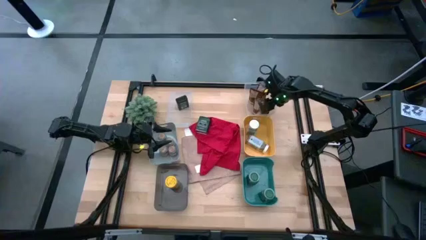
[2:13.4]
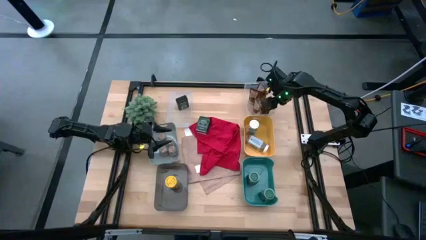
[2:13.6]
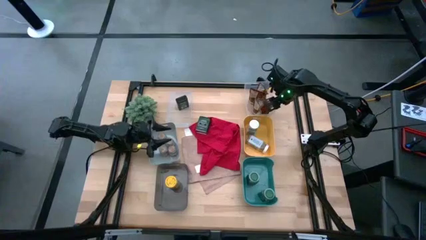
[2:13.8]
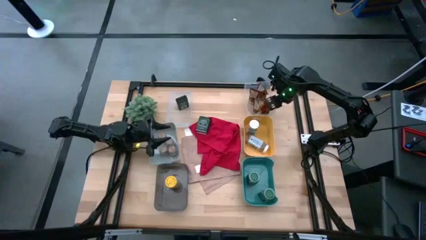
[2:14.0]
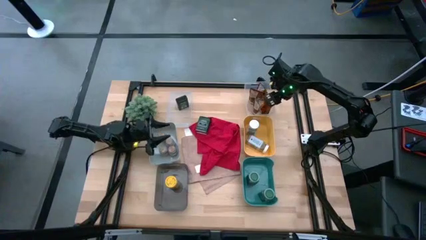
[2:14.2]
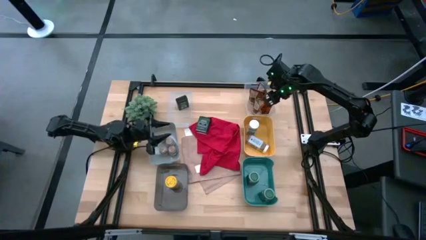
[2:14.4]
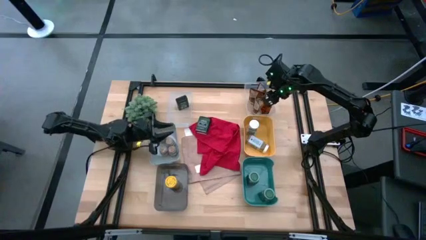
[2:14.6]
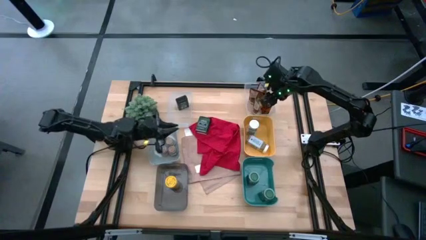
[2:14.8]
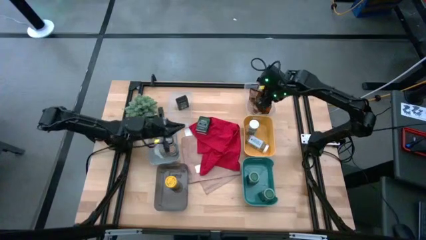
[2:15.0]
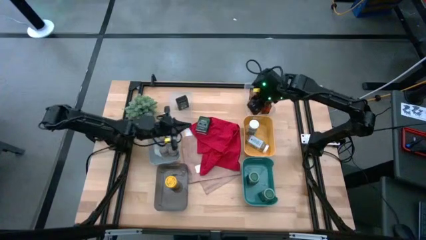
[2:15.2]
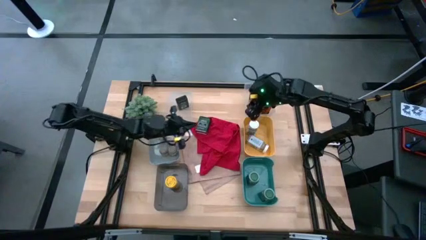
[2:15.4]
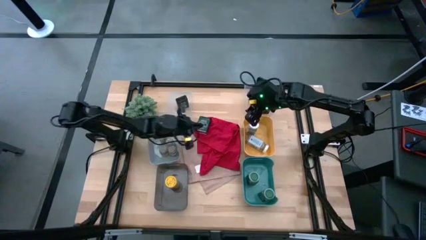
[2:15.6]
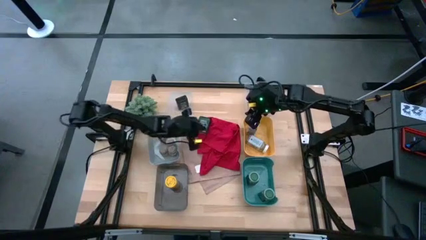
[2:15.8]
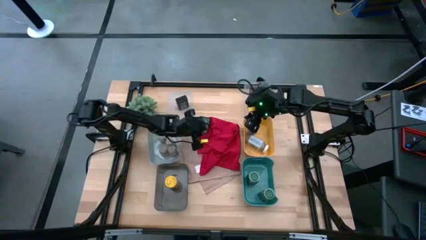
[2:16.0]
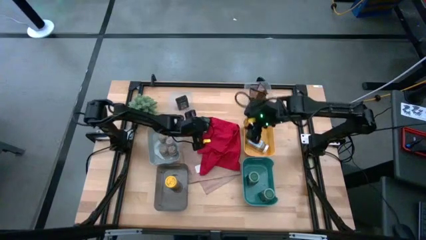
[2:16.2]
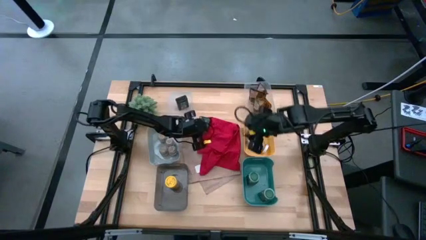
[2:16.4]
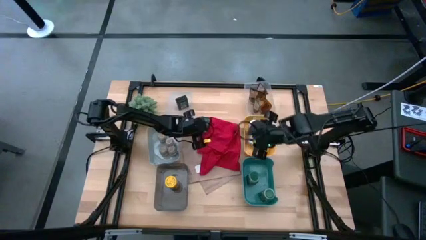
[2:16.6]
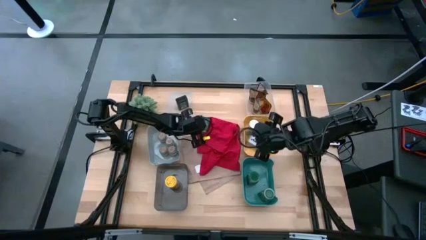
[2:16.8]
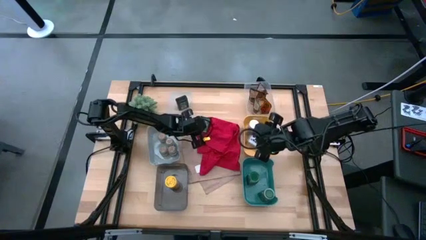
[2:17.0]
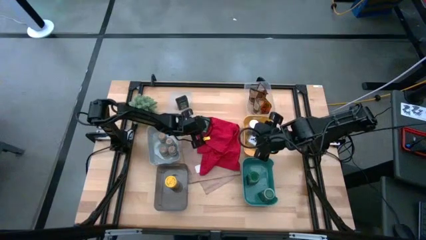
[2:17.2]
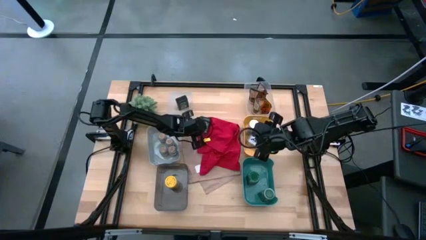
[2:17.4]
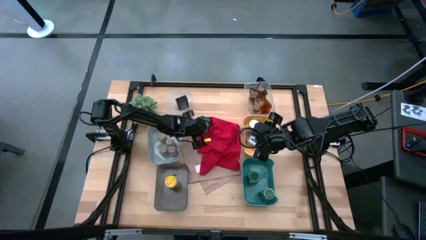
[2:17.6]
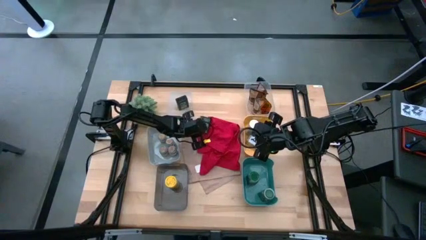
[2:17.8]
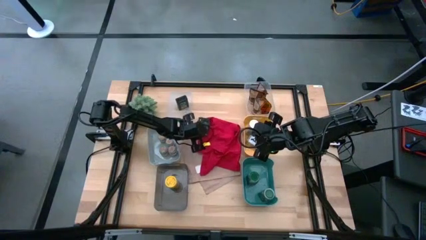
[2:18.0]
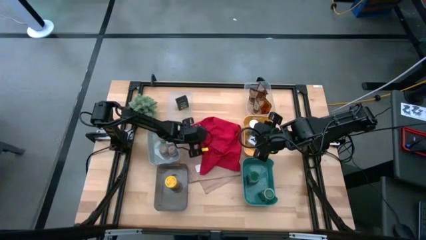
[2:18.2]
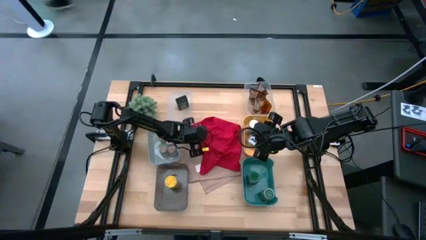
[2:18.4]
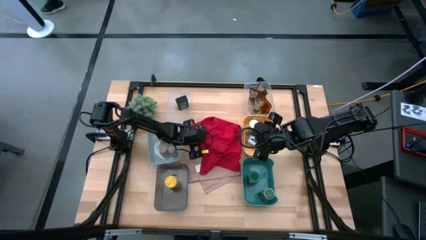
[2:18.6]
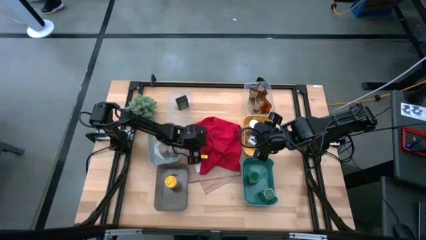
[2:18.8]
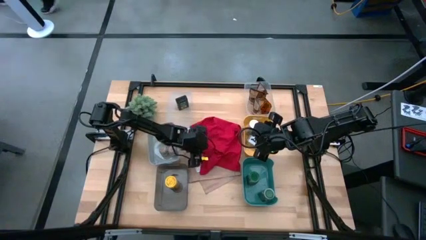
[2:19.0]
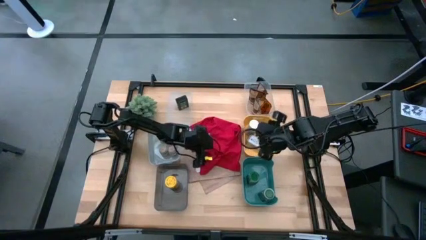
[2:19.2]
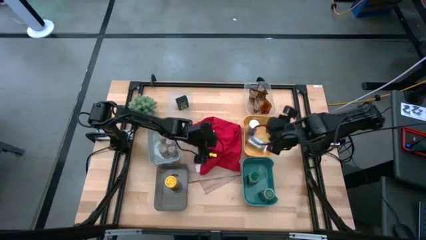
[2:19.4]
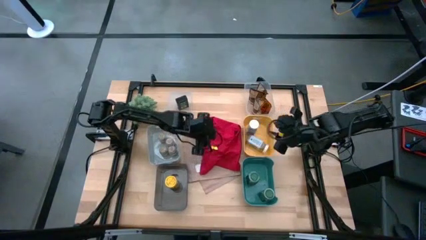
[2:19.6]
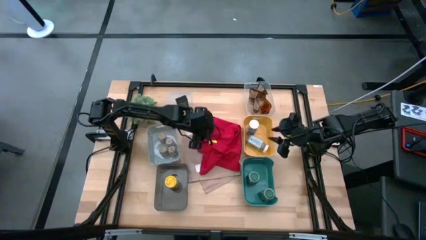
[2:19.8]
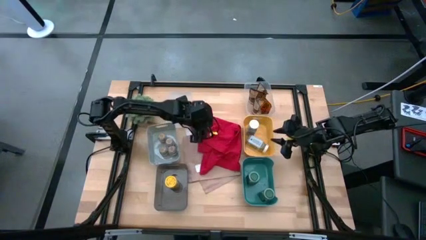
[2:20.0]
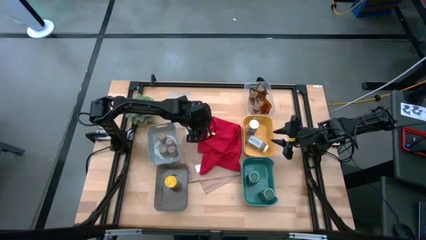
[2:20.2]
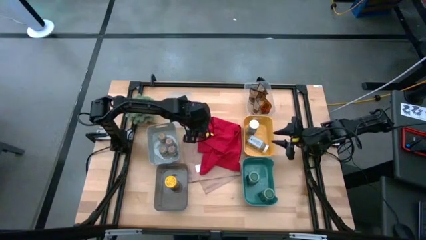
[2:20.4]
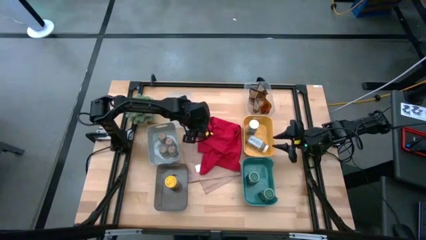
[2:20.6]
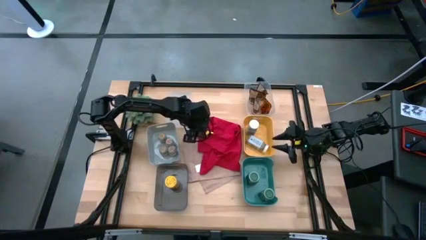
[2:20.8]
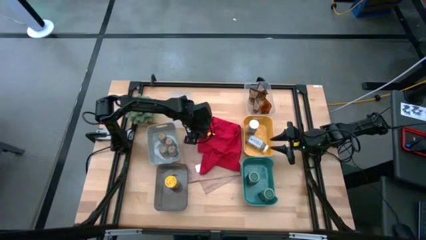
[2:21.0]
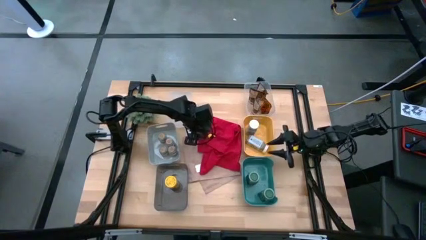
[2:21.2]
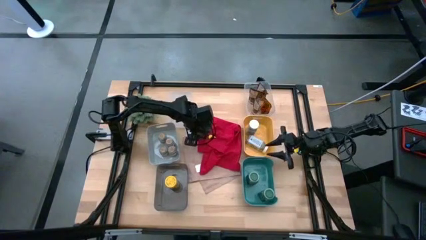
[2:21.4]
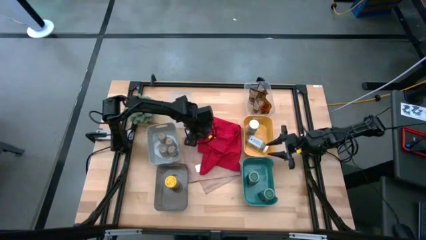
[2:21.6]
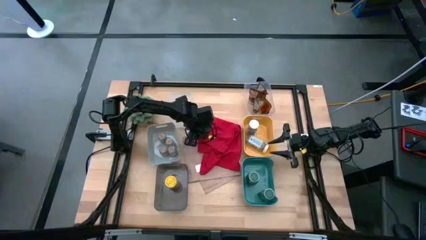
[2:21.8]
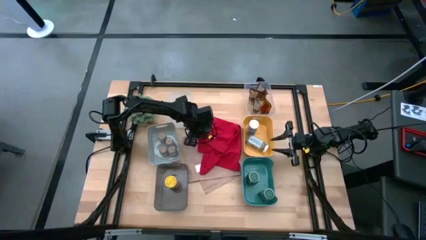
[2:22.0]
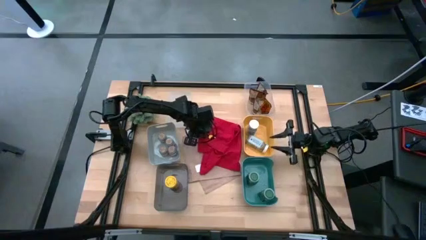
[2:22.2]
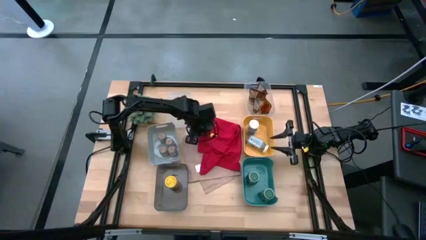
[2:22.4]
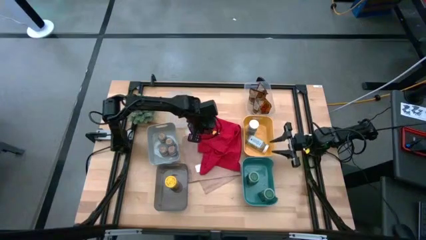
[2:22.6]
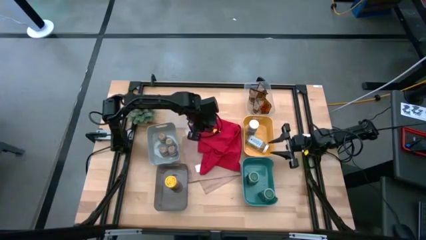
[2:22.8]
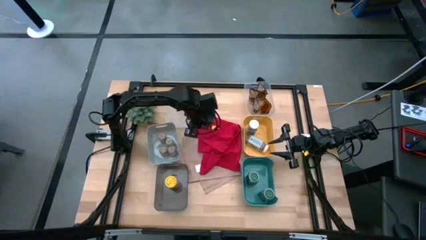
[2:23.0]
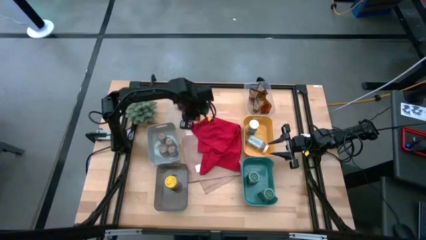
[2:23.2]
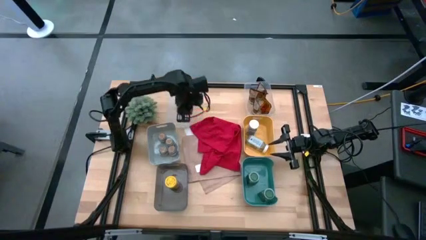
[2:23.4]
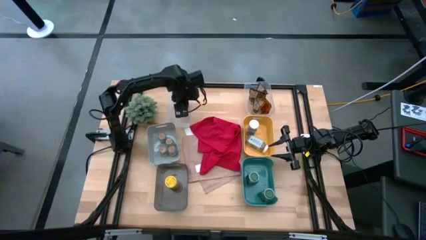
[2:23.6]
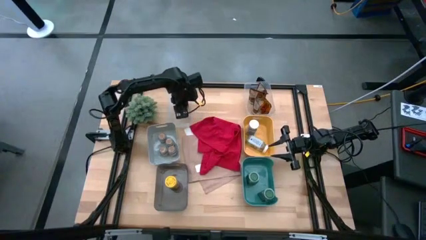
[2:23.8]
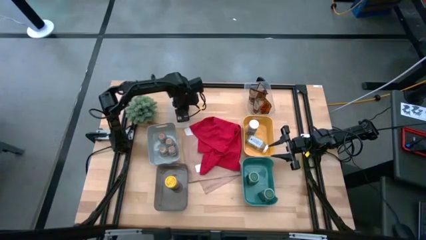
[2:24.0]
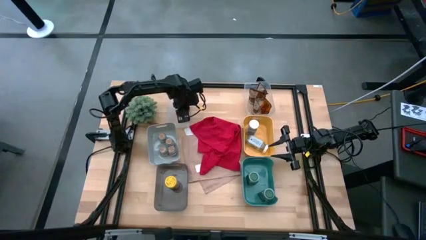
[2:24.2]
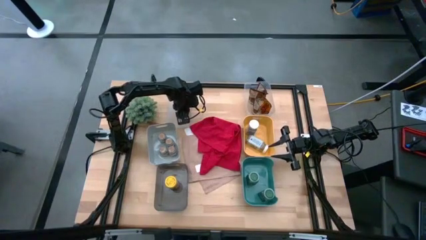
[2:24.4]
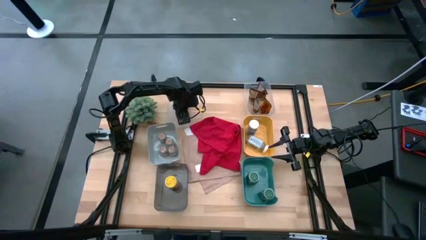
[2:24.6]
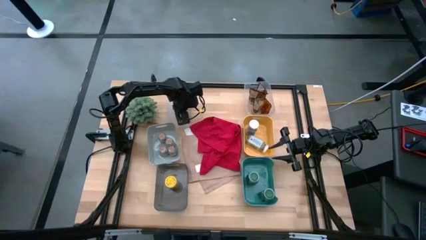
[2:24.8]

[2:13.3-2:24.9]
Task: Sort spices by type
Put the black seasoning can into the left transparent bin

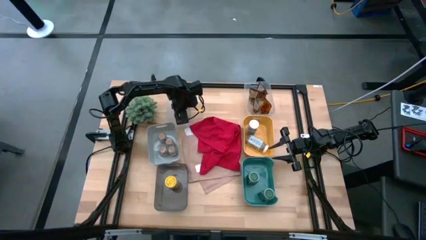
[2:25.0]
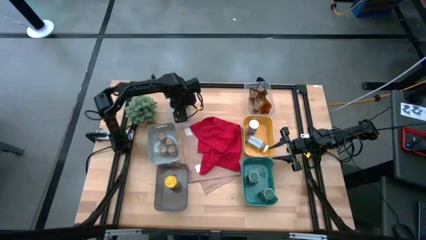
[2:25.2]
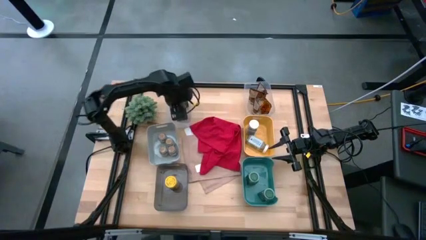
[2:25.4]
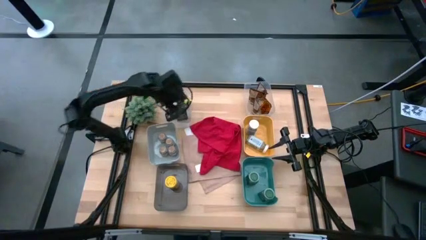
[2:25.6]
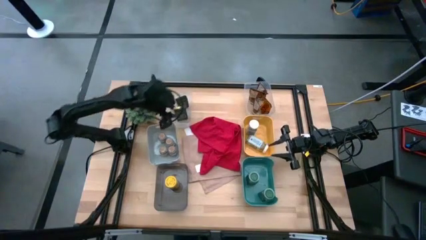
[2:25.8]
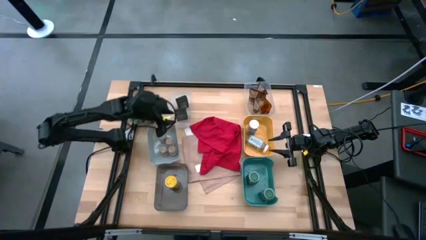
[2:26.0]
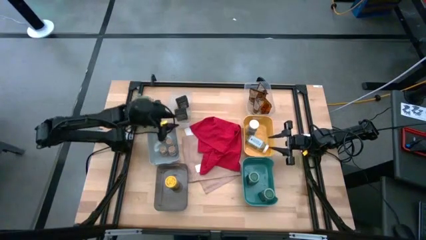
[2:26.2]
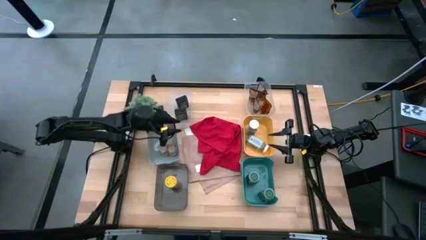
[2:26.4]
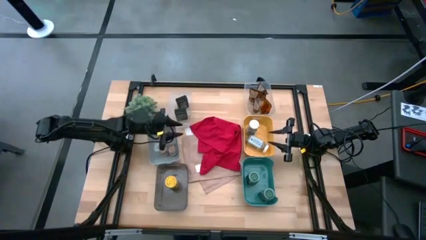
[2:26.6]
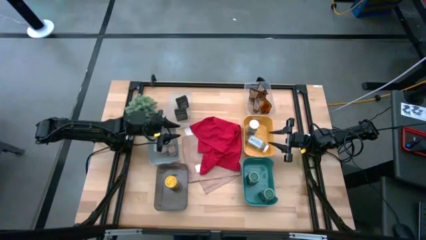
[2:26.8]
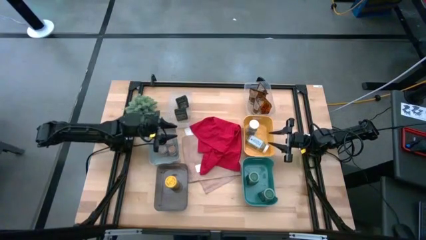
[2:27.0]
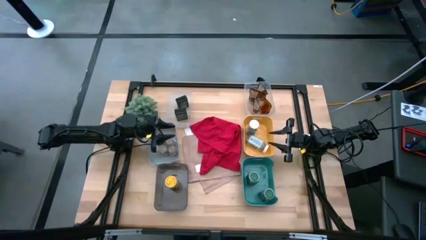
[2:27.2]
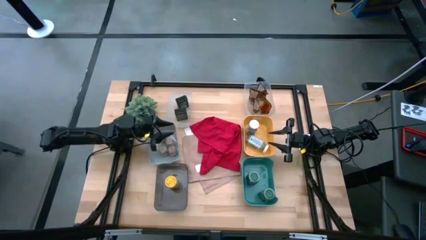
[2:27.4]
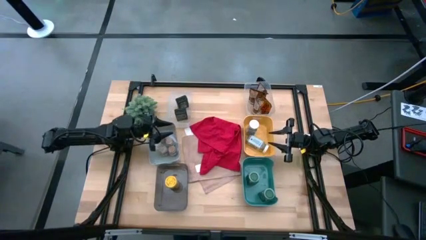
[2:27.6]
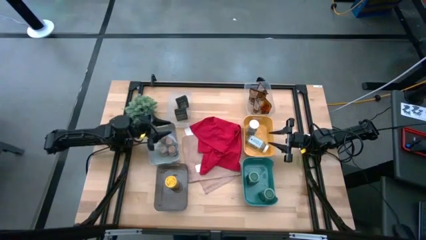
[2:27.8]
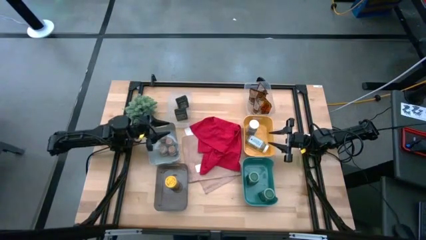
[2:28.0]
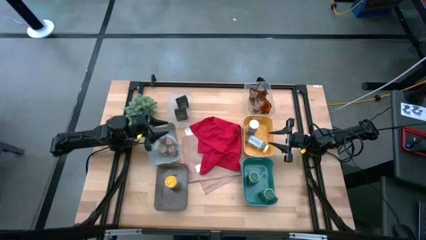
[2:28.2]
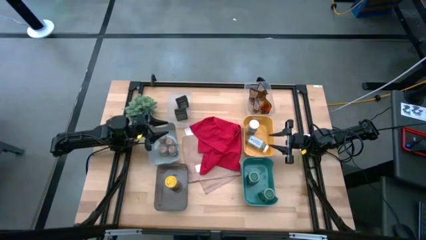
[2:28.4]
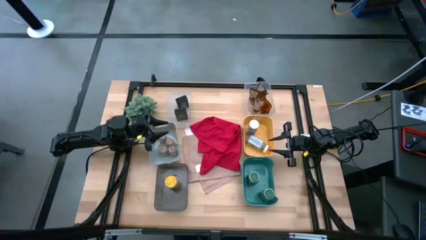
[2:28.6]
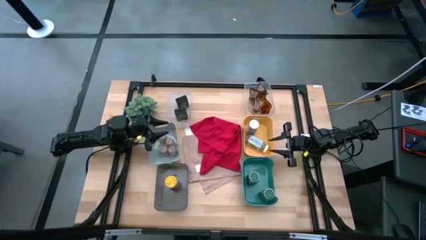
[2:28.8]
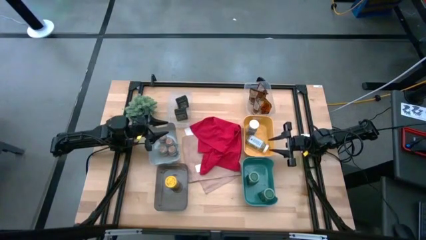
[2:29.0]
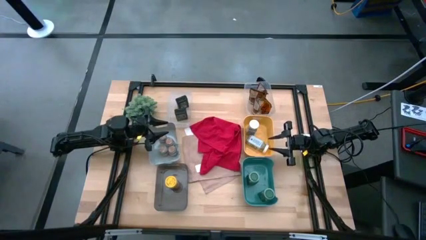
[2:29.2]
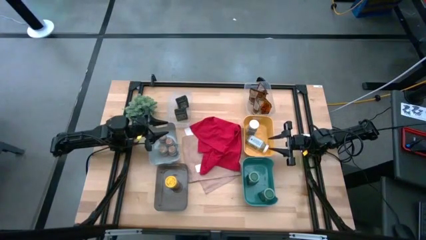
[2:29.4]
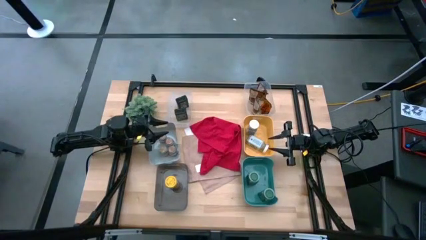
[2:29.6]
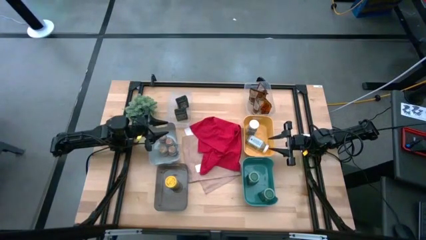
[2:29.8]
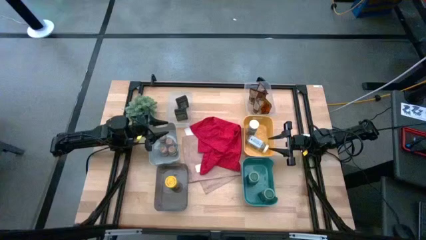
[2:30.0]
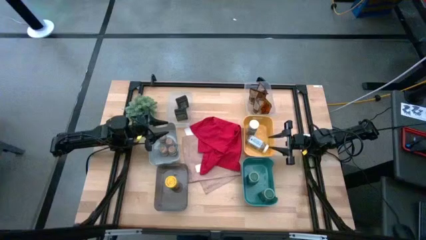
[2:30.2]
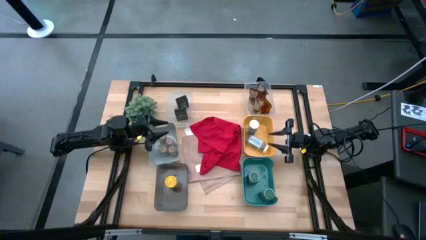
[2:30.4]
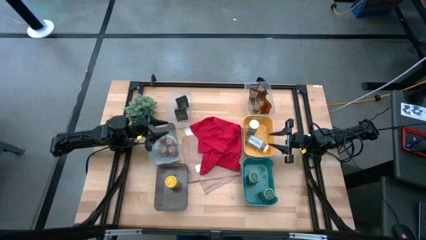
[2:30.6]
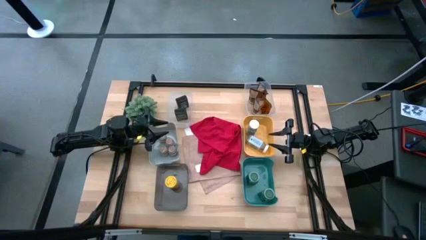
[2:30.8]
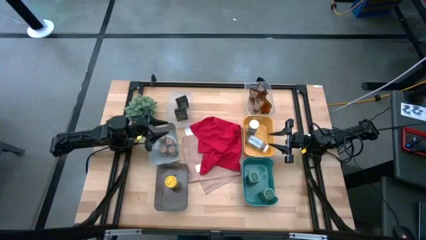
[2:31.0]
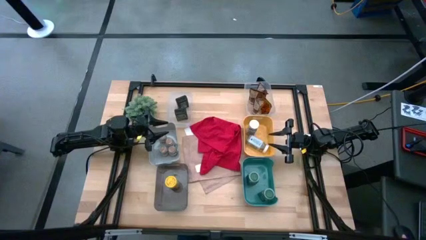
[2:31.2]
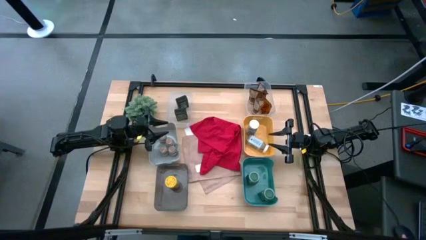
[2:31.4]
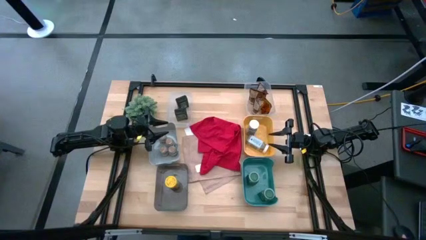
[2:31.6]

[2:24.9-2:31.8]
Return to Home Position
